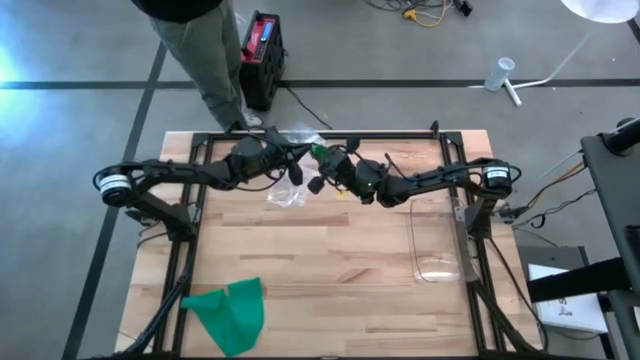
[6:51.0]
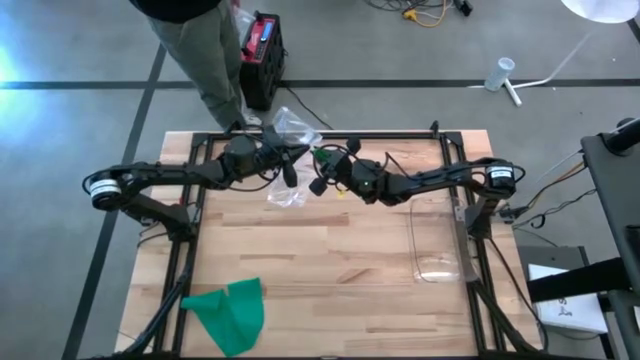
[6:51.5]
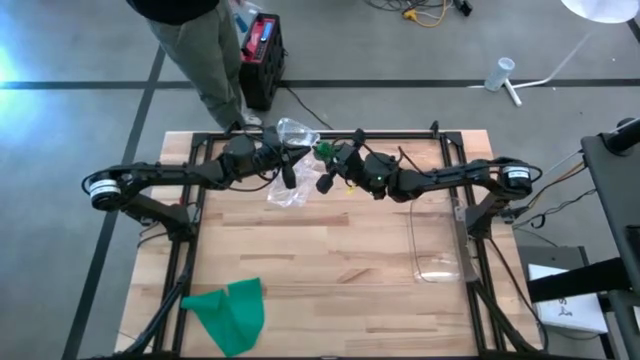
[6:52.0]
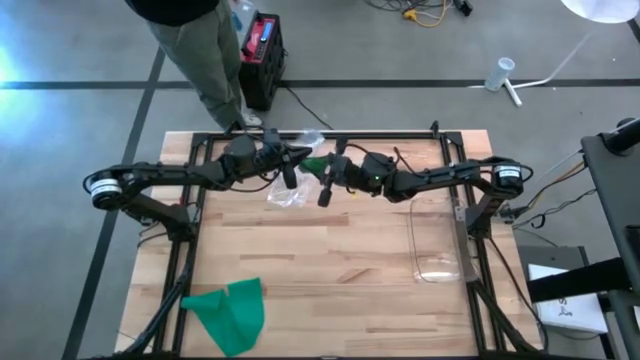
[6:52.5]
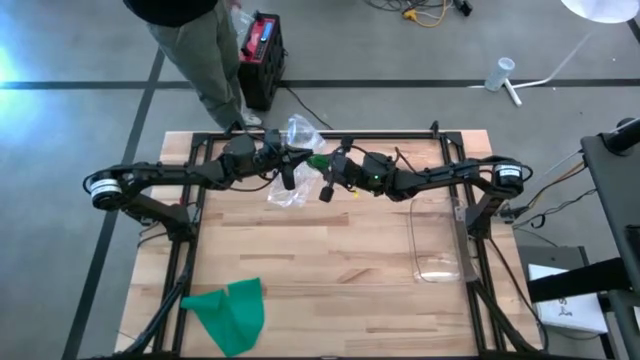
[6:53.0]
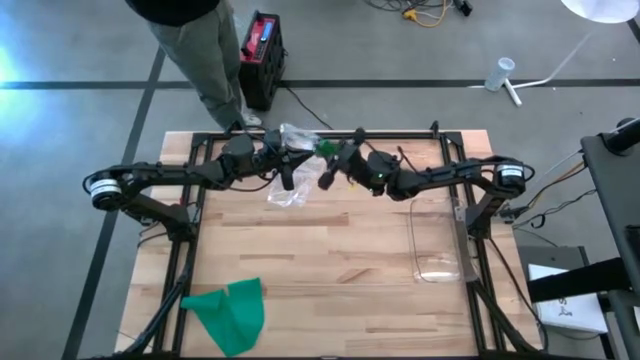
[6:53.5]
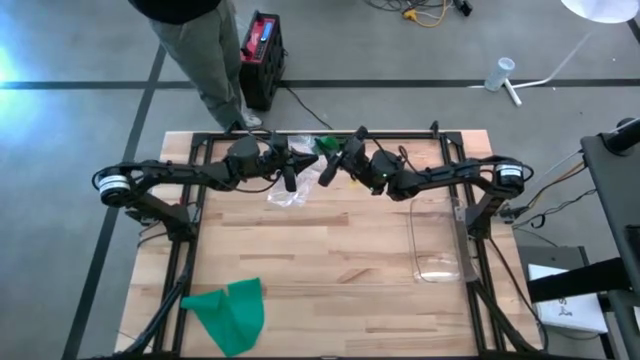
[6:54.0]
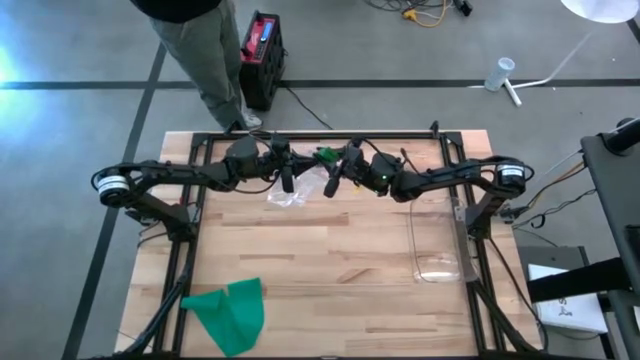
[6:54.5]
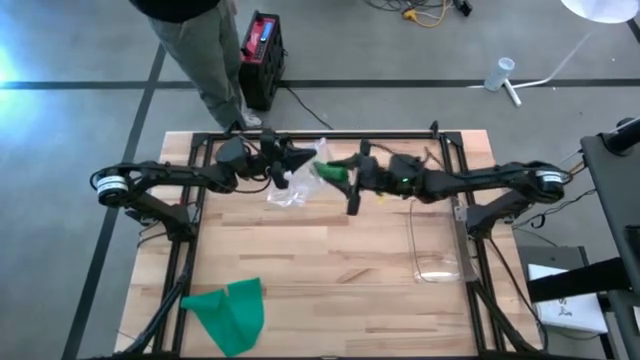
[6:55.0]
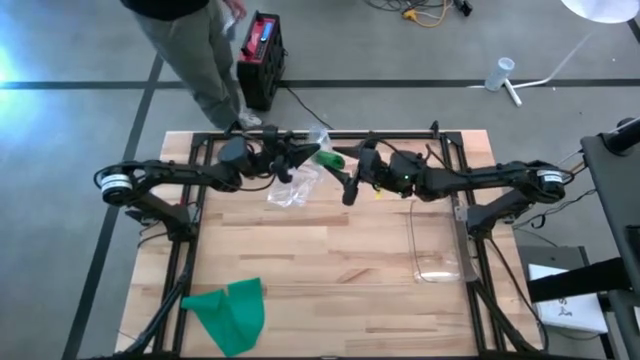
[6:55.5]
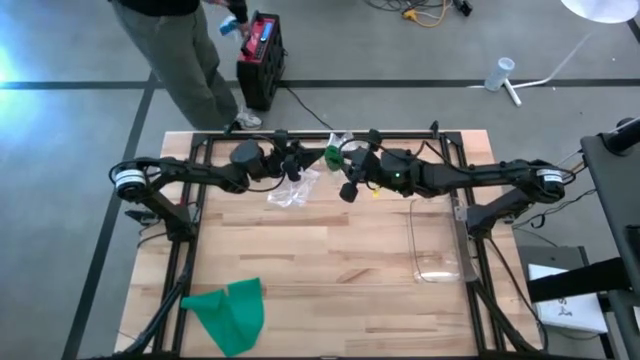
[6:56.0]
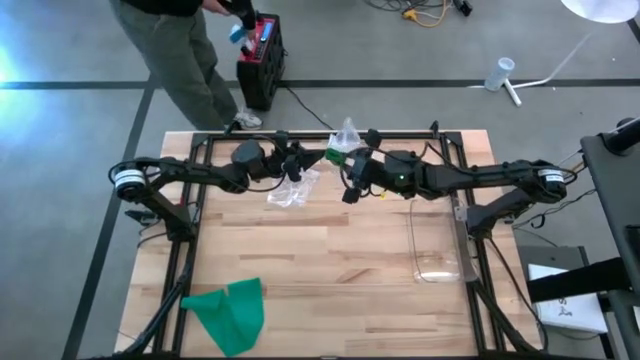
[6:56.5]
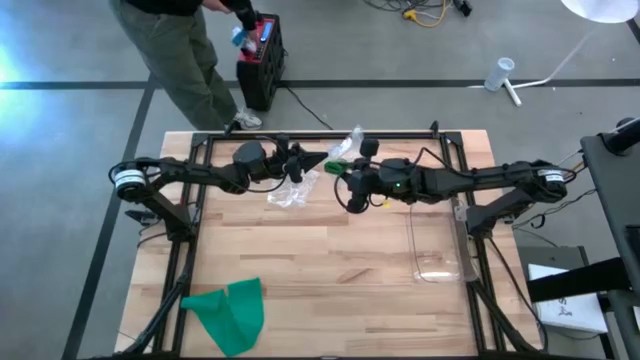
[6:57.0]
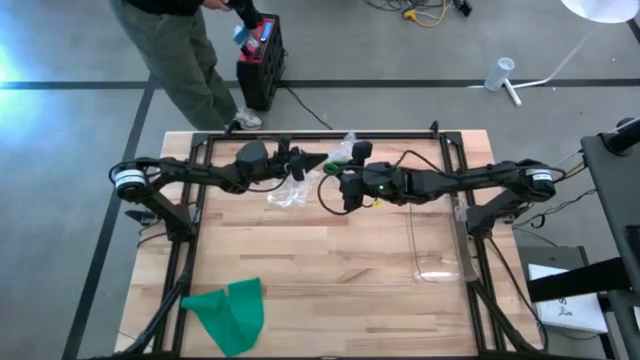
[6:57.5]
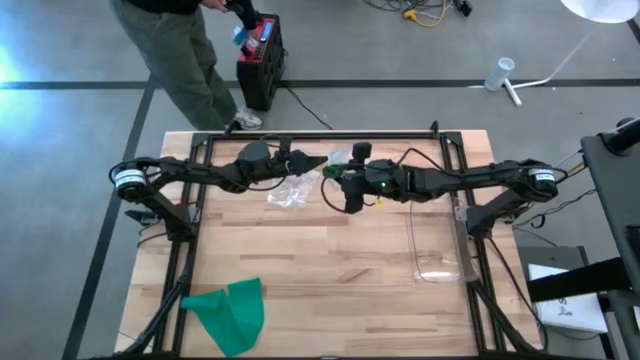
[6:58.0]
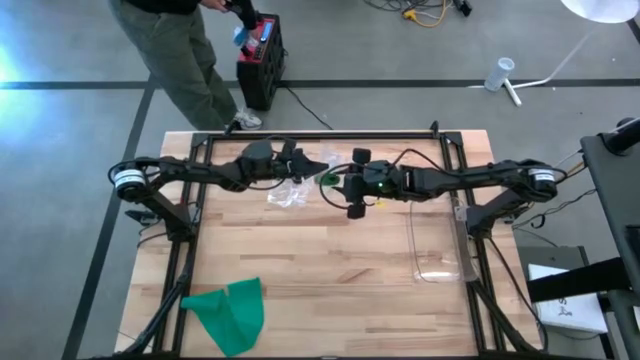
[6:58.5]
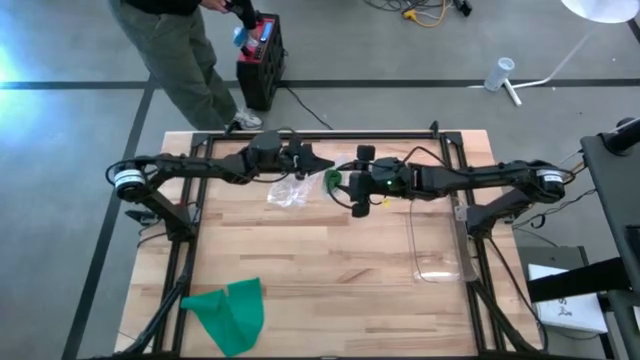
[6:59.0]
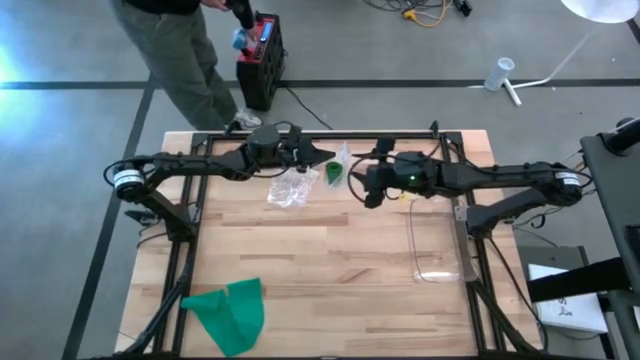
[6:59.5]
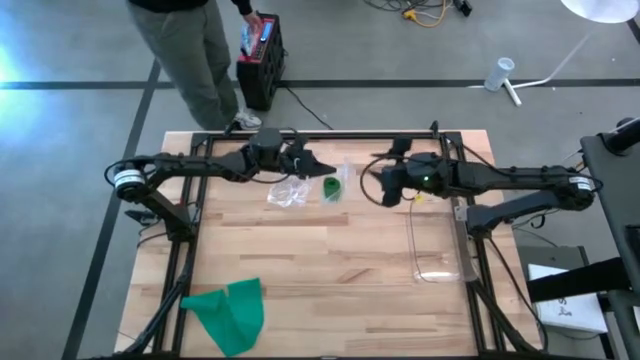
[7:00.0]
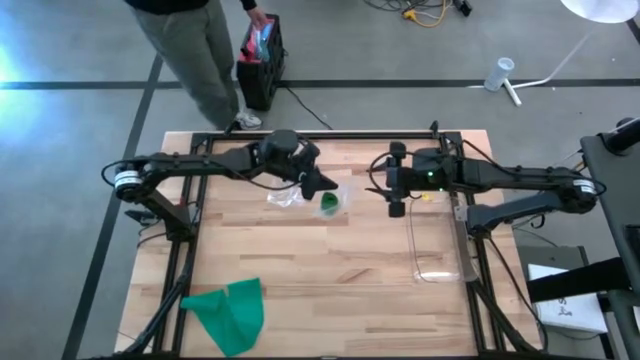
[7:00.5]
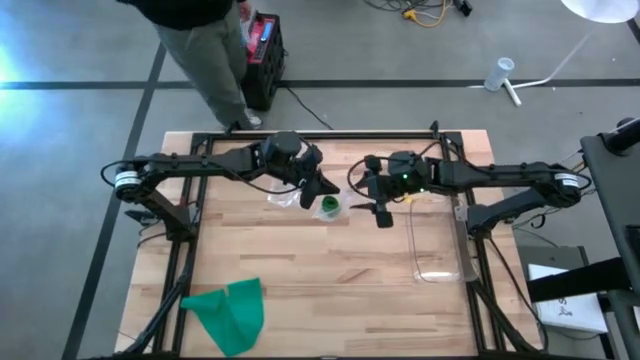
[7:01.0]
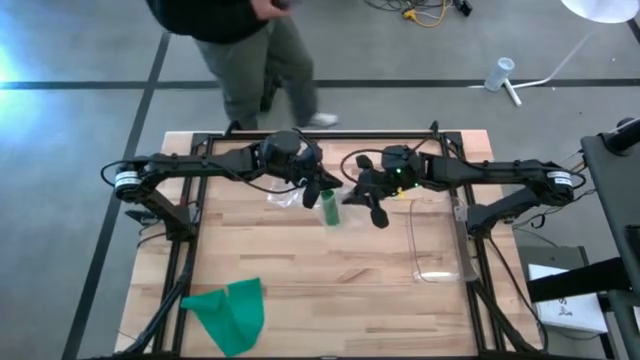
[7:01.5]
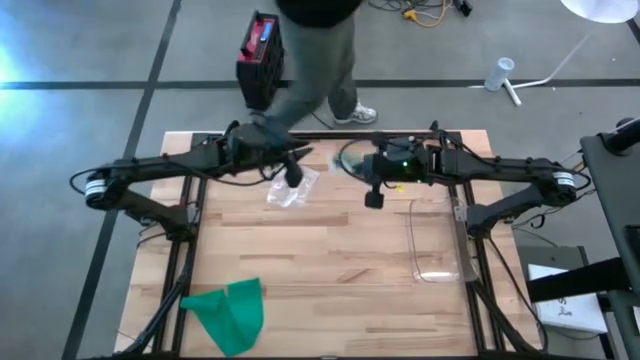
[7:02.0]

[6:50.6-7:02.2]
Task: Roll bandage
Put the rolled green bandage into the transparent zip bag

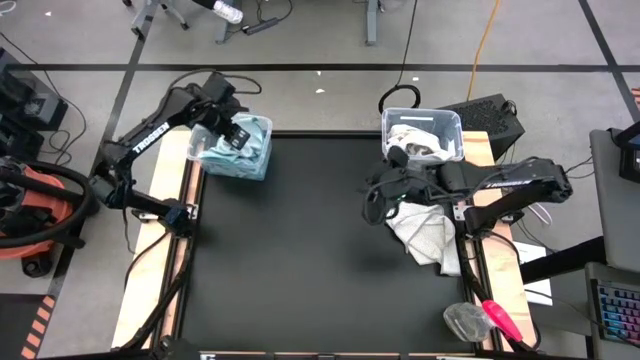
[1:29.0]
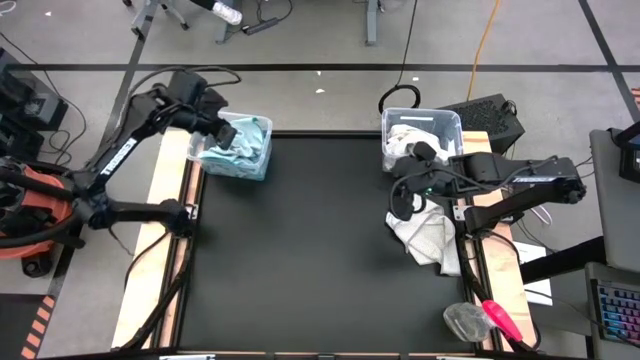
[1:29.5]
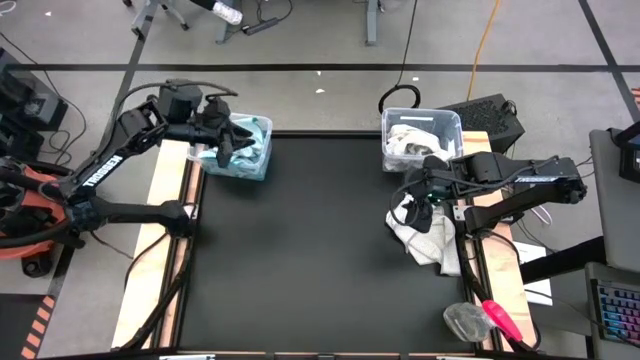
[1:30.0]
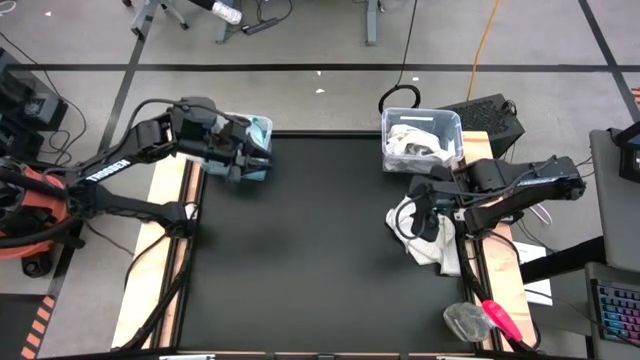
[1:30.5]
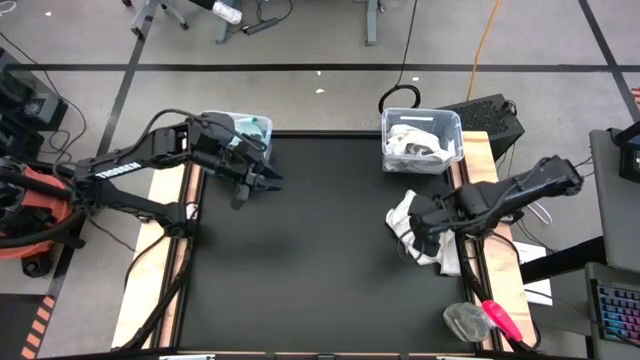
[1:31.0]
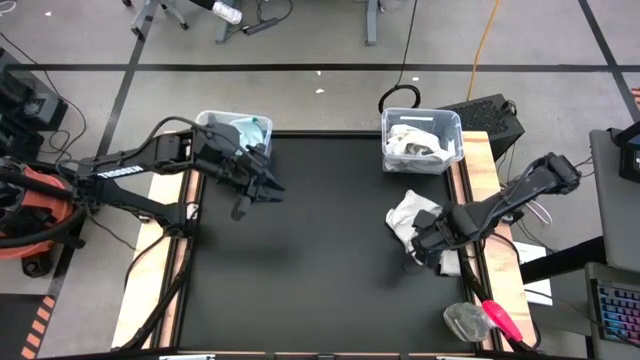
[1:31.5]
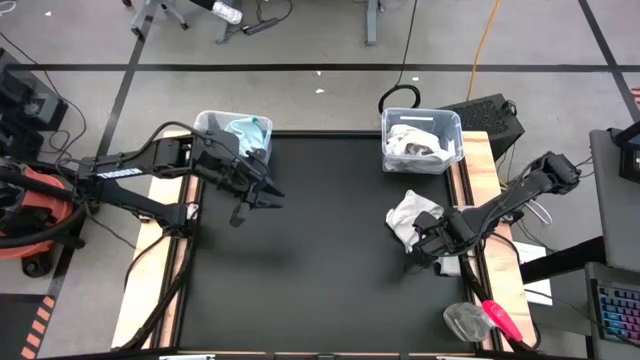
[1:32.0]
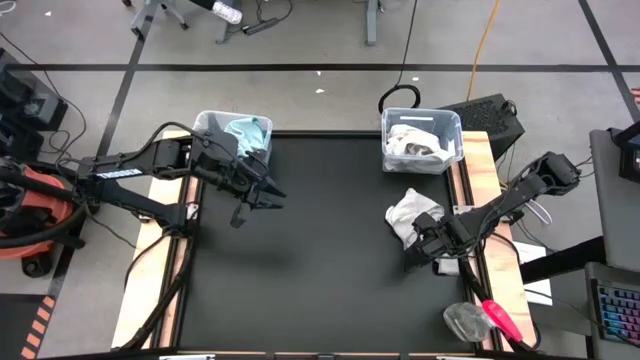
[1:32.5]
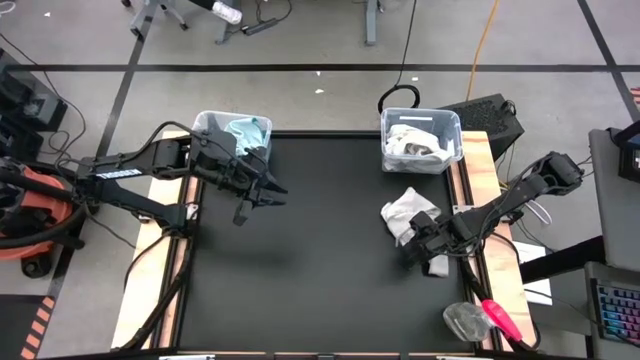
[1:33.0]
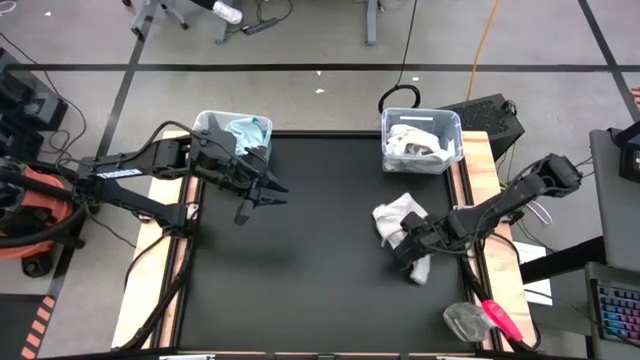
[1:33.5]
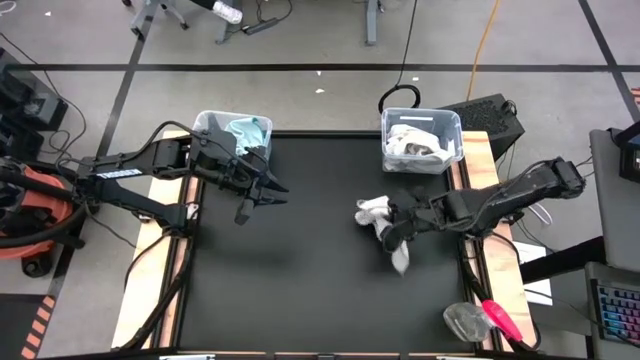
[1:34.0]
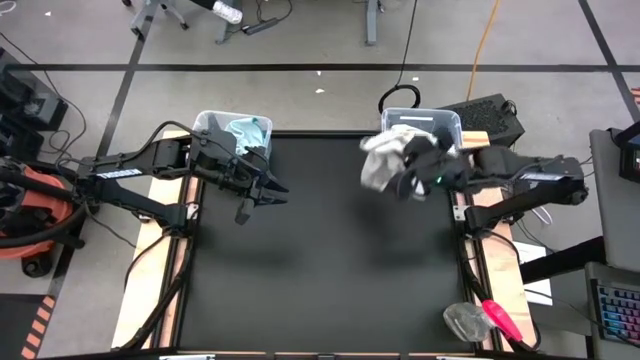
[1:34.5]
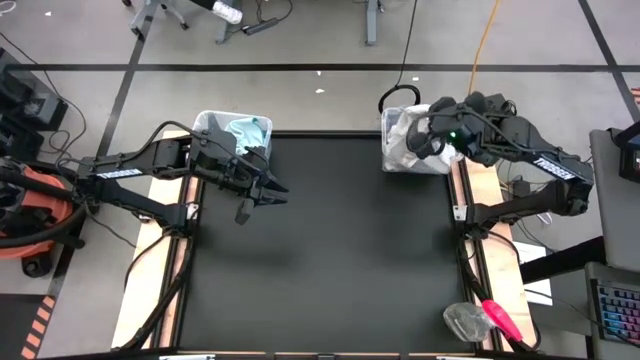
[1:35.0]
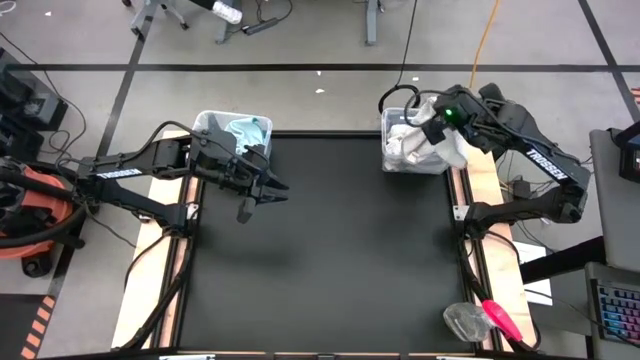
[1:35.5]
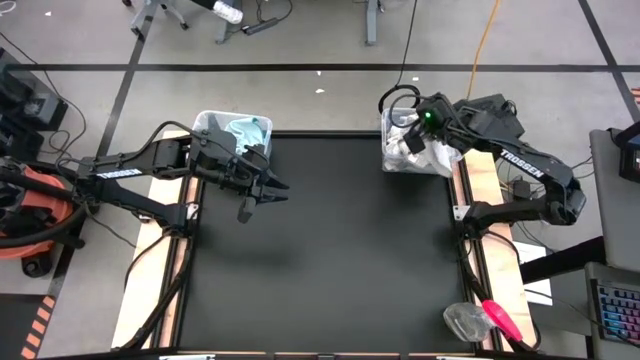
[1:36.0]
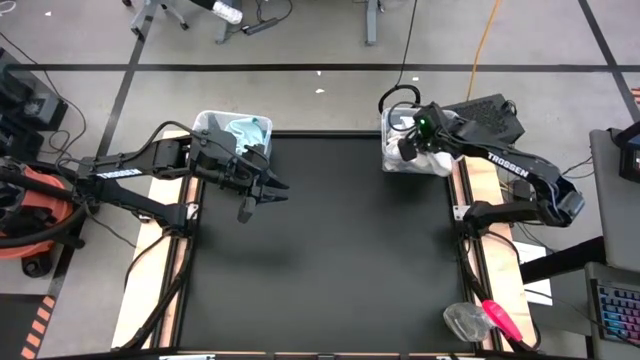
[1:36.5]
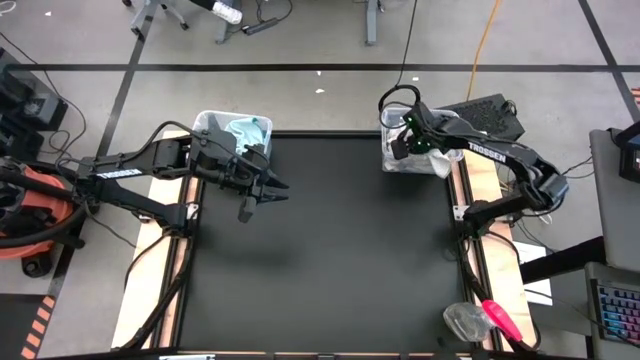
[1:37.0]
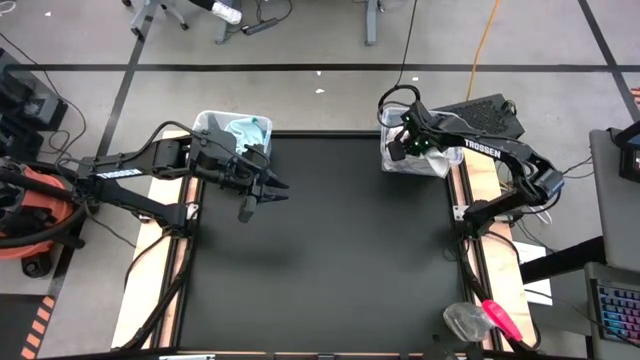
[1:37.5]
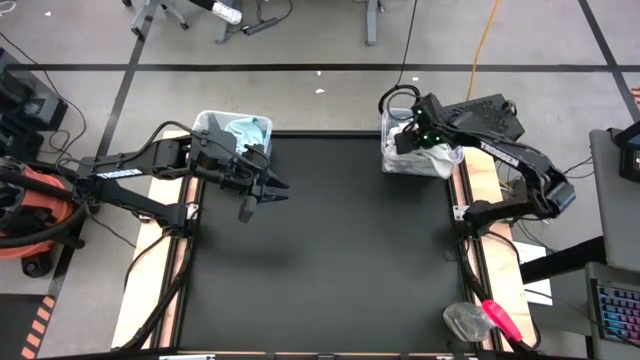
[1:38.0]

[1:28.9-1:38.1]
Task: Sort microfiber towel by color & place in baskets
Put the gray towel into the right transparent bin

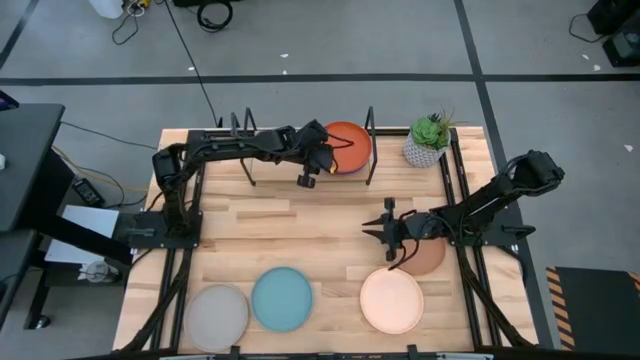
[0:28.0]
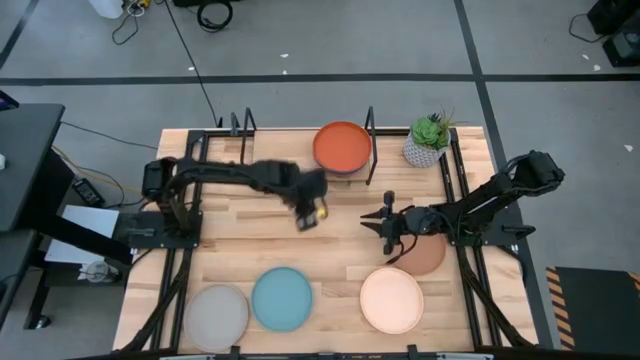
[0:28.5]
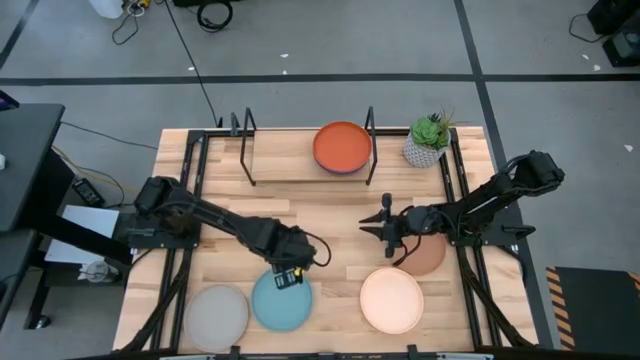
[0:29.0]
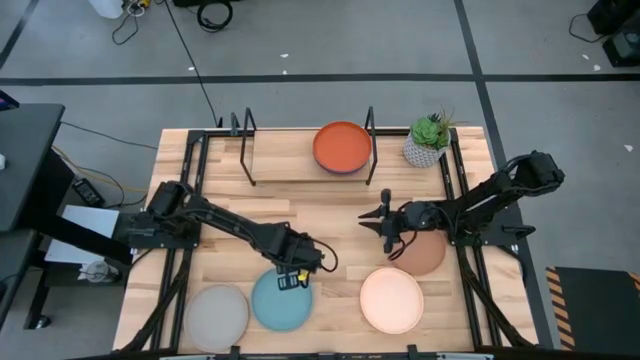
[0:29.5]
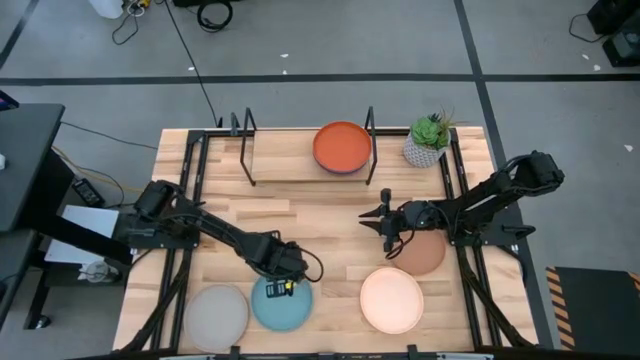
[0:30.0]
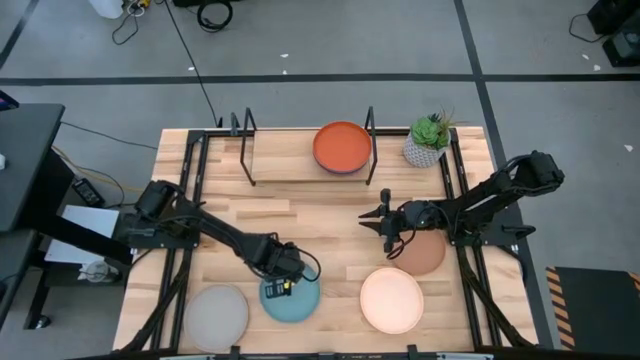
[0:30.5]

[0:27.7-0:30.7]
Task: Place and stack plates onto a shelf
Put the light blue plate on the shelf
